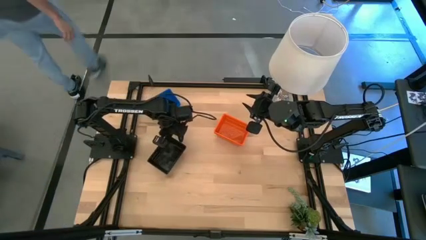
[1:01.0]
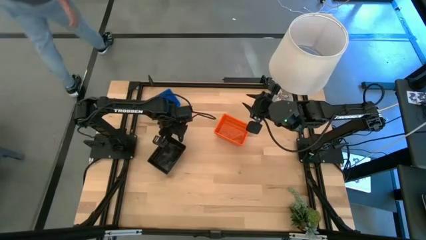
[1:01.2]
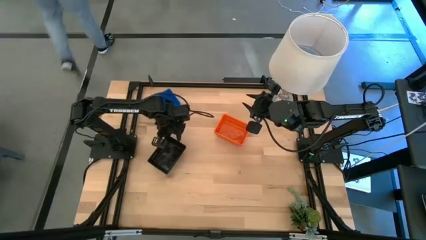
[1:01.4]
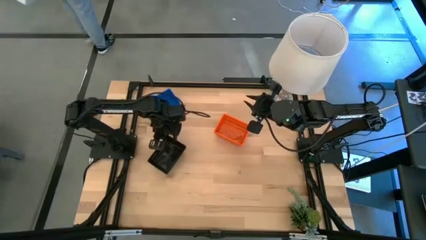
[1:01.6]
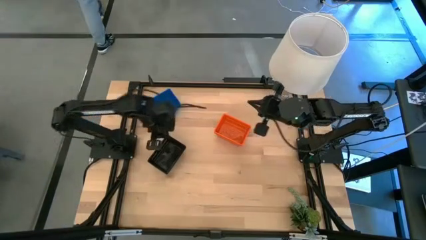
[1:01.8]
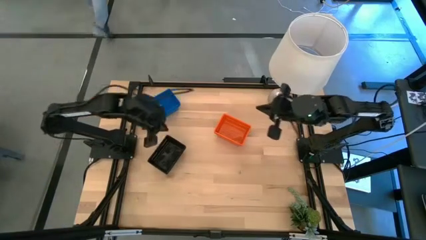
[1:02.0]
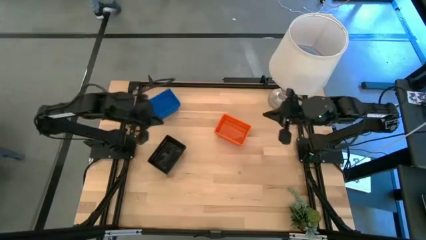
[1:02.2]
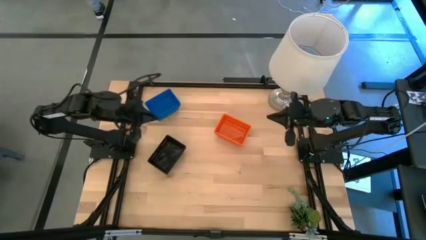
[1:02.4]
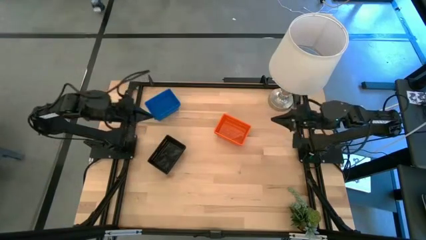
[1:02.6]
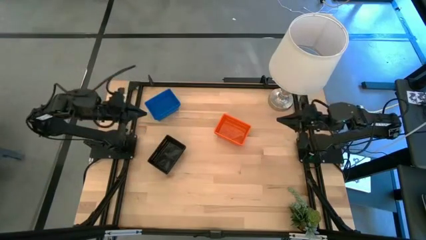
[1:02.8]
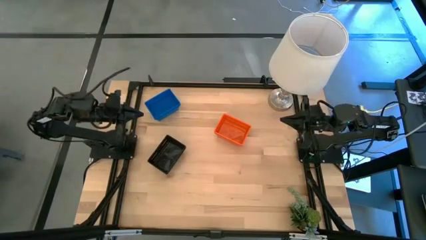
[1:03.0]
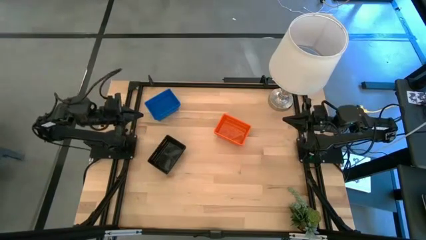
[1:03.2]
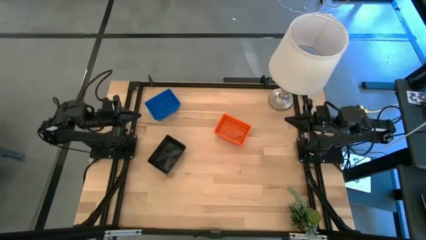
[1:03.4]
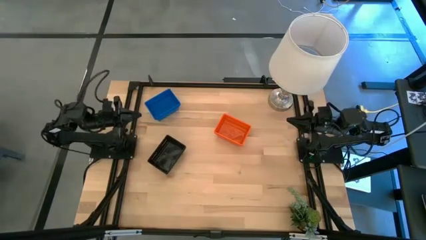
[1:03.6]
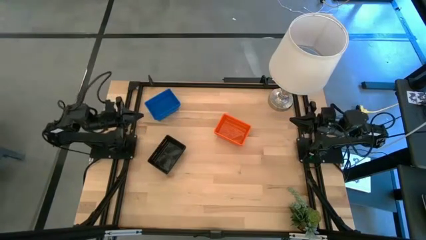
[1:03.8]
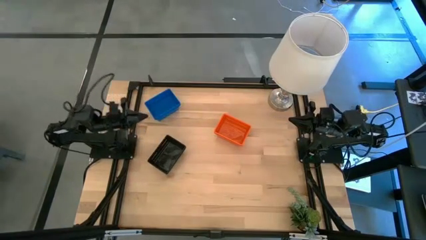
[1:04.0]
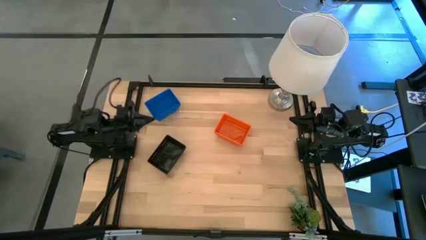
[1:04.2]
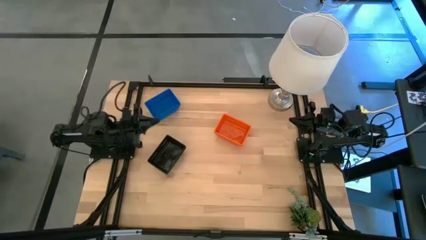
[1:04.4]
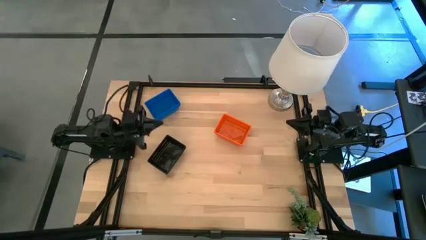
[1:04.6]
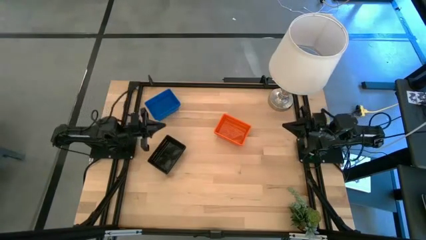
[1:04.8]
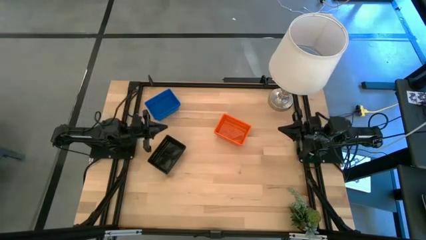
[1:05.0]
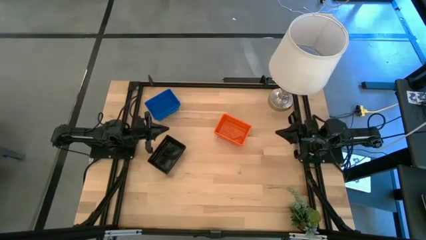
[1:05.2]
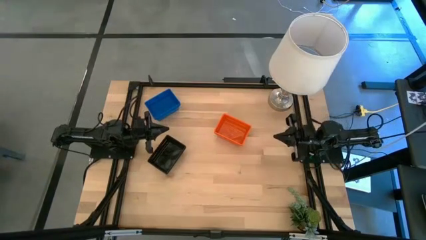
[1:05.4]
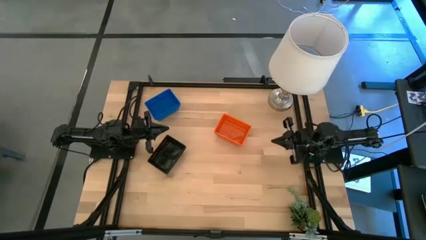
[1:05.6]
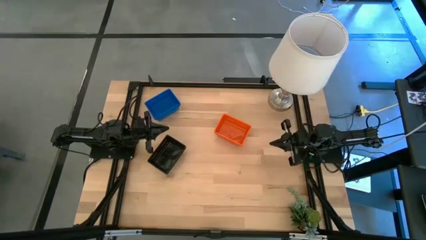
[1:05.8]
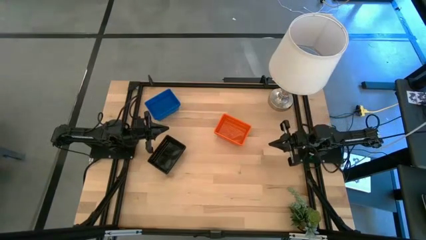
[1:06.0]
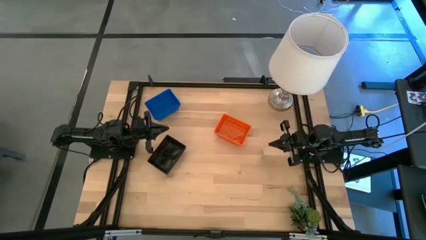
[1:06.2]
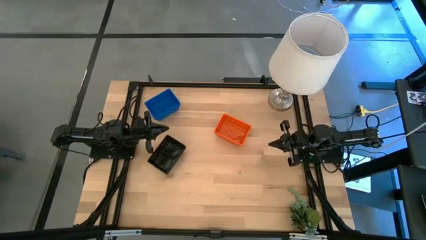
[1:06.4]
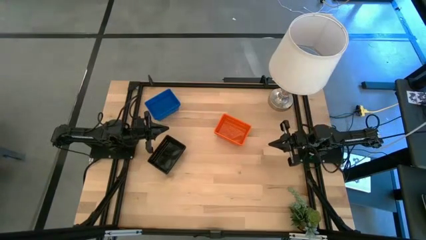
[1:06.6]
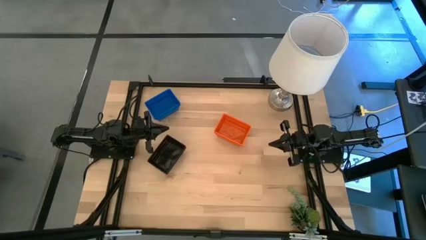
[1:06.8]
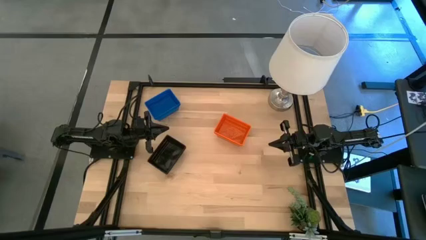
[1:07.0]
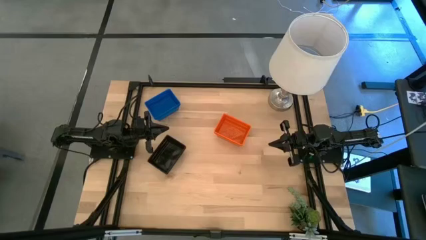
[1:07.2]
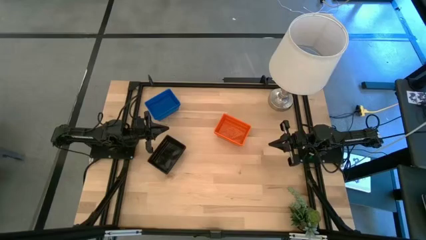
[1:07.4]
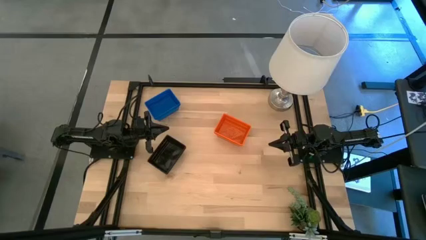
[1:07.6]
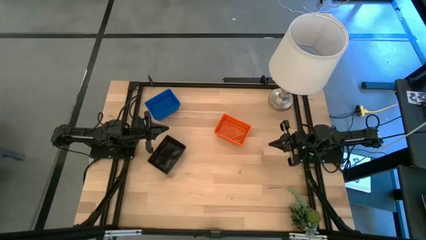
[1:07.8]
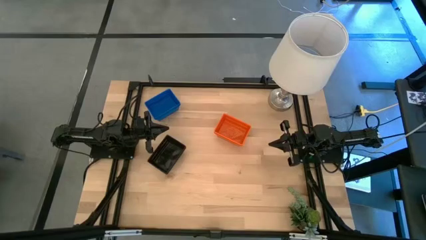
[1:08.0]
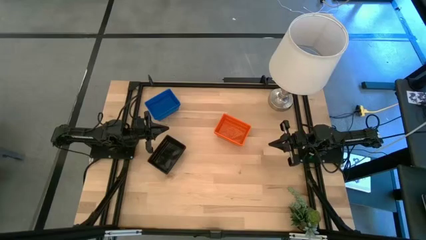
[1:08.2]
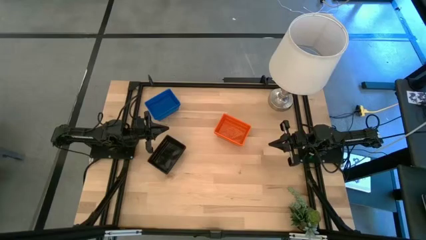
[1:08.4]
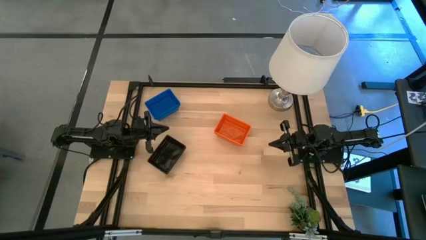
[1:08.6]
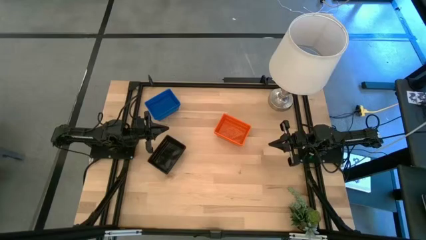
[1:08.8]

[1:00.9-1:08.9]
Return to Home Position

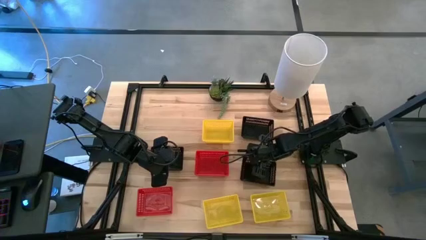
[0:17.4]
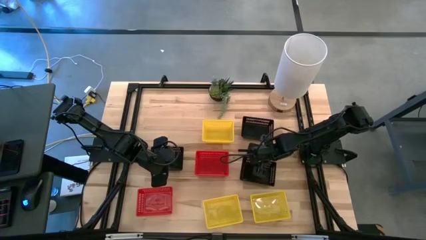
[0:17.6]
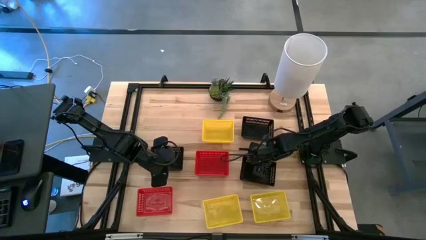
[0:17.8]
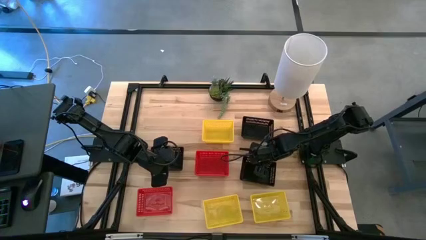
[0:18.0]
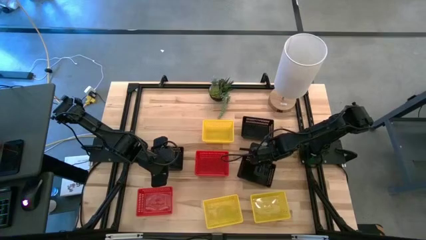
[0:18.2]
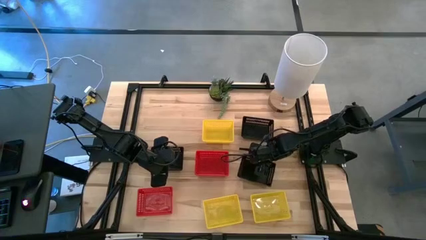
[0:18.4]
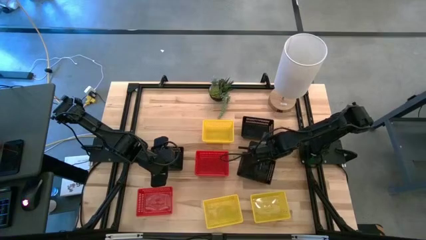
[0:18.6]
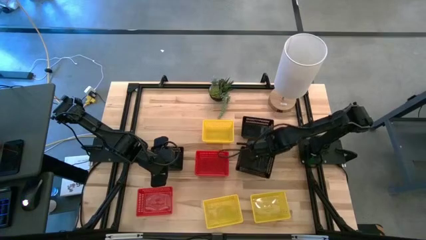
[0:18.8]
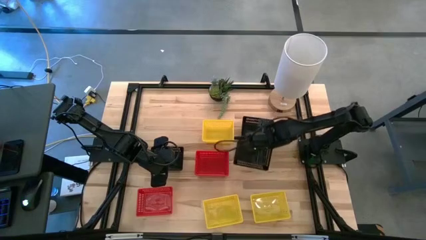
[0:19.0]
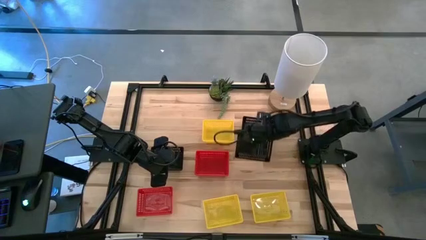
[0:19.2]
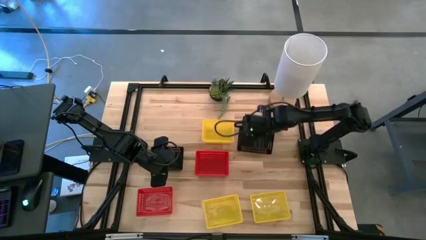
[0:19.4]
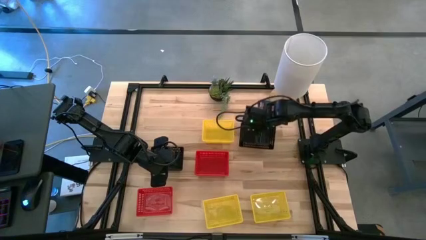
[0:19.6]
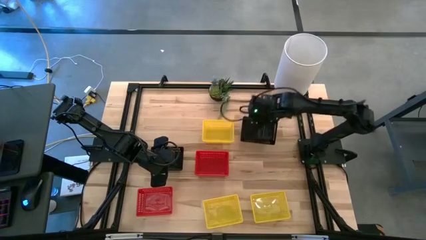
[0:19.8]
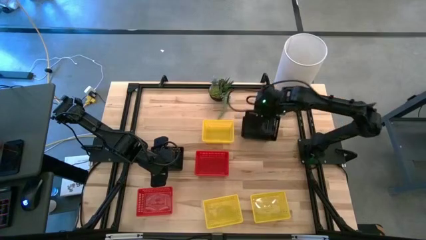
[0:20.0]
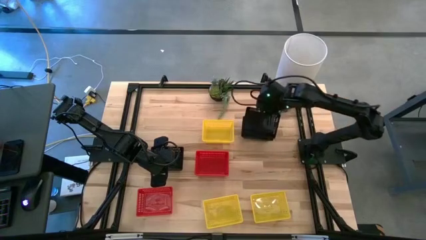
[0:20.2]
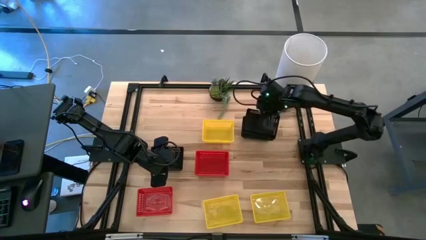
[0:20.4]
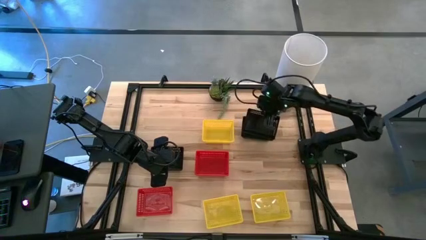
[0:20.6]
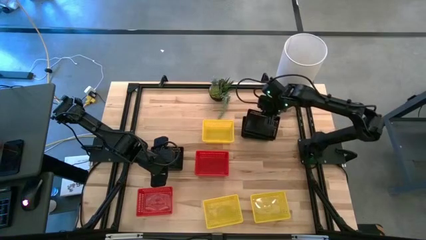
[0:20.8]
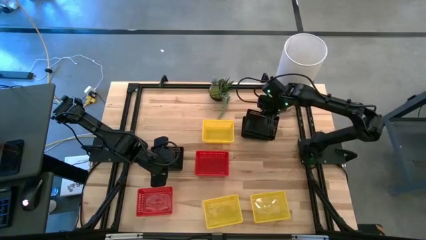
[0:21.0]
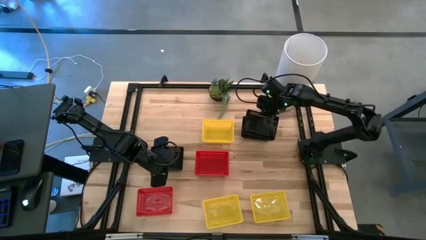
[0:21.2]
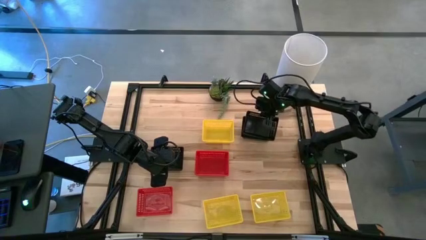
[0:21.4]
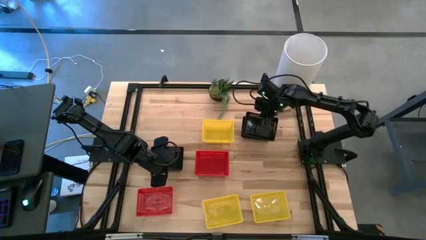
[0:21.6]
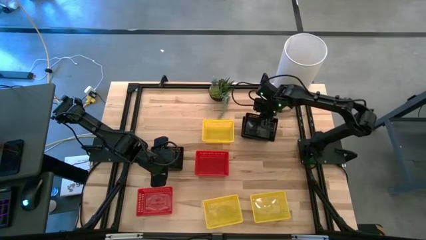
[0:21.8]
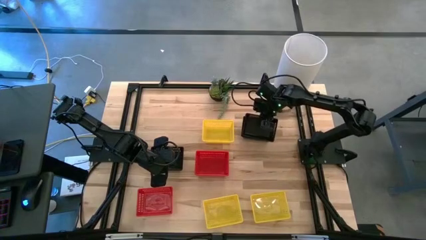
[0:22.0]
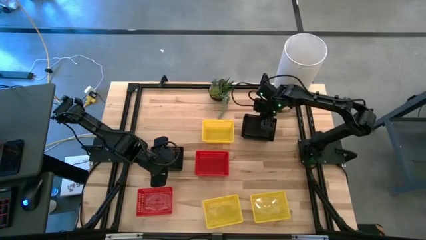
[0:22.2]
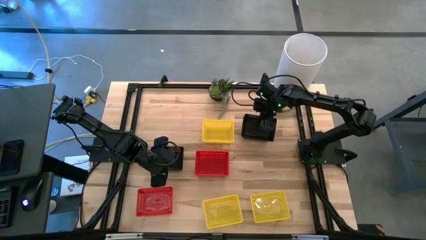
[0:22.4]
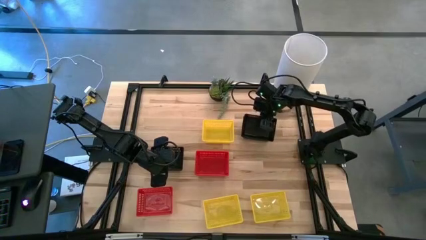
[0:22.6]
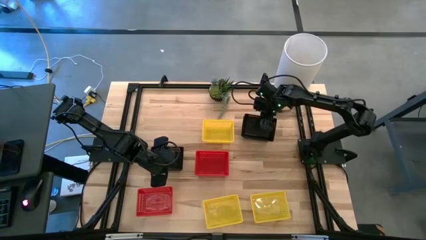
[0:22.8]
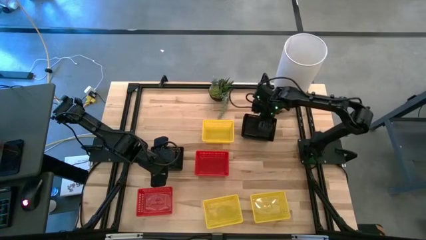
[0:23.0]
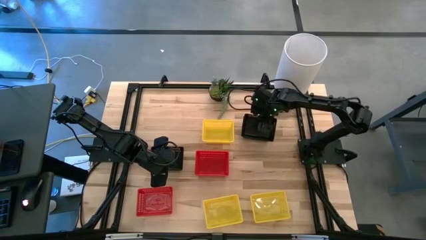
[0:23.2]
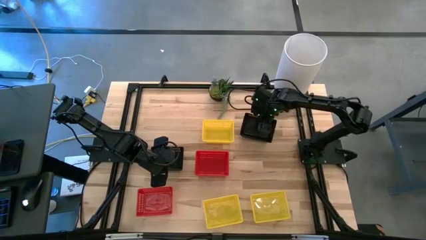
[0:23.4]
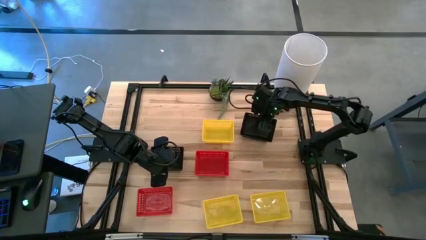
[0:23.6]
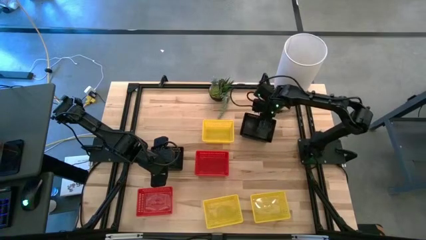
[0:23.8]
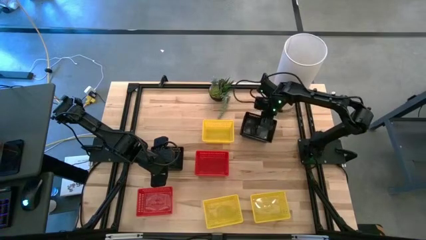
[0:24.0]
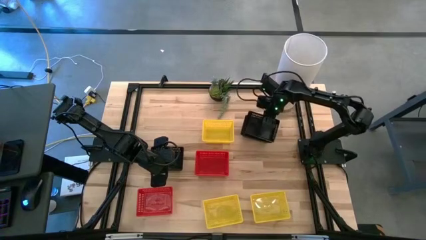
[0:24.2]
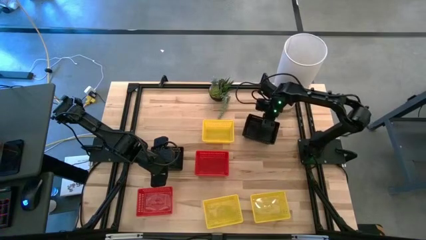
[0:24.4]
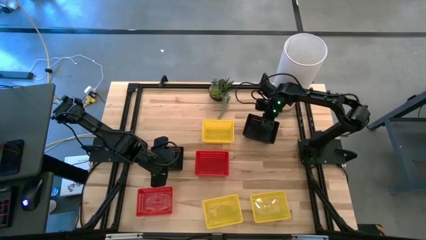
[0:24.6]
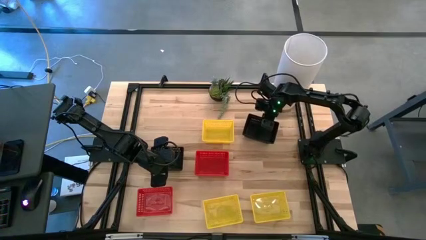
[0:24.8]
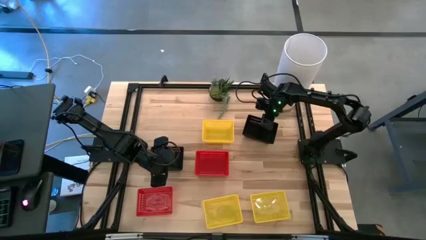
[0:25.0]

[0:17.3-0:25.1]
Stack the bottom right black bin on the top black bin
